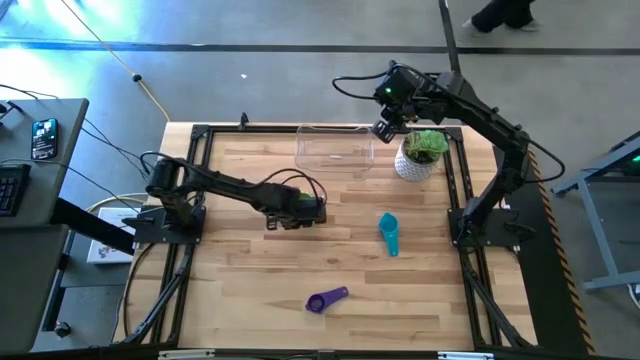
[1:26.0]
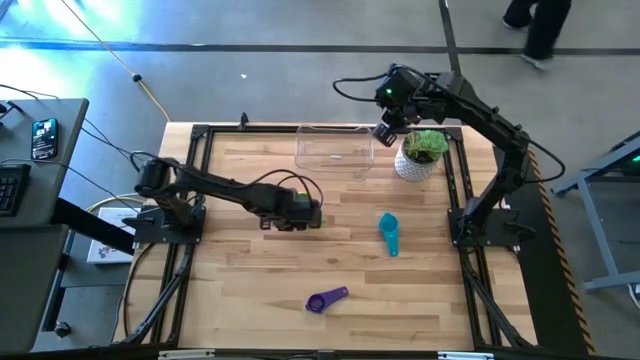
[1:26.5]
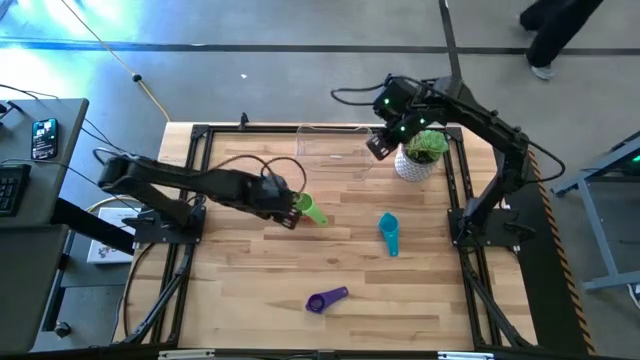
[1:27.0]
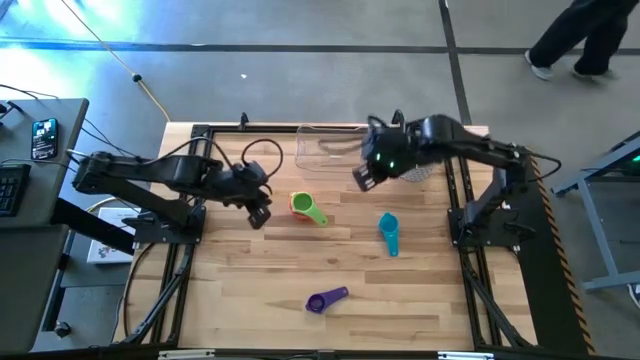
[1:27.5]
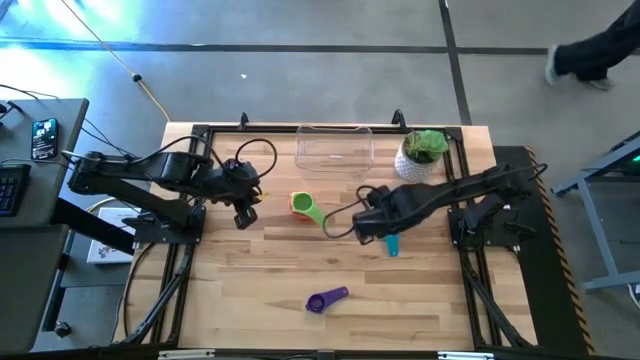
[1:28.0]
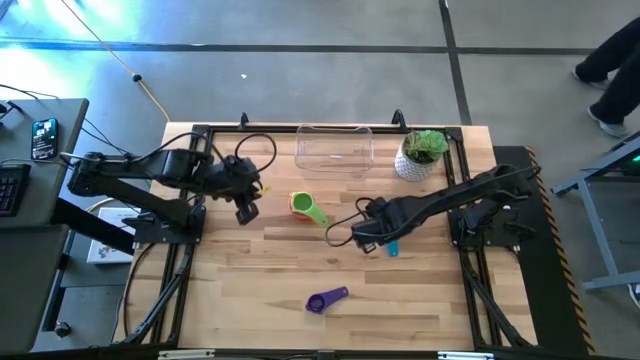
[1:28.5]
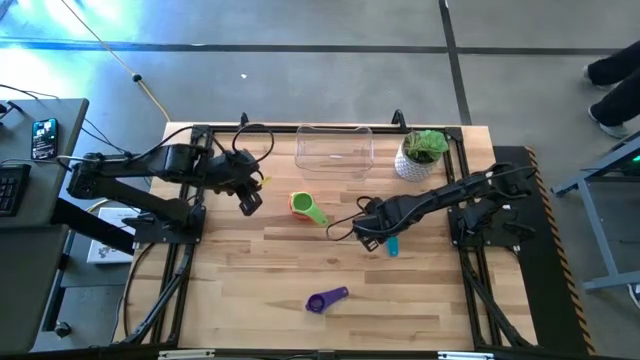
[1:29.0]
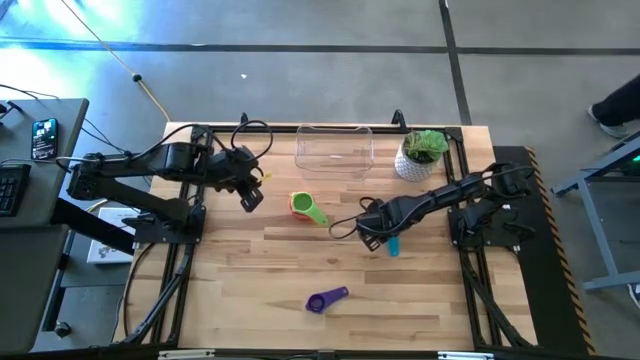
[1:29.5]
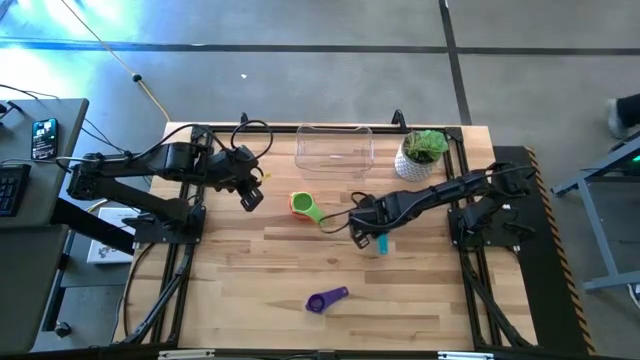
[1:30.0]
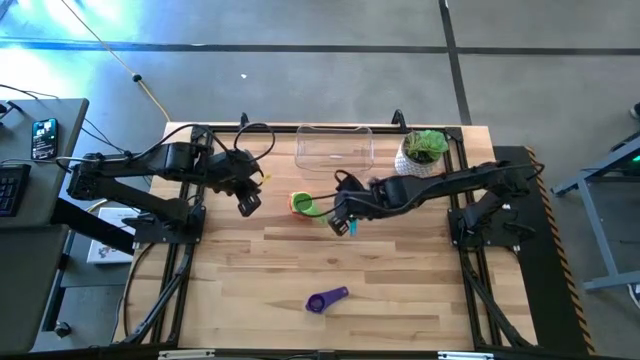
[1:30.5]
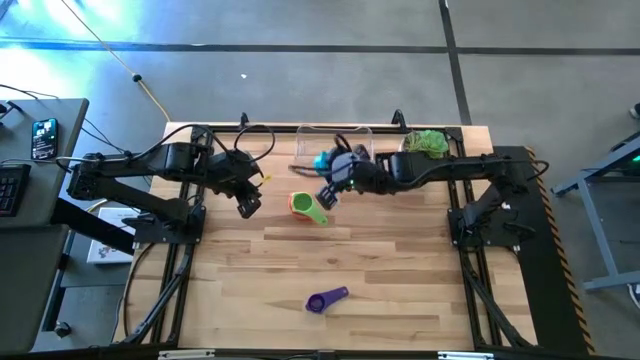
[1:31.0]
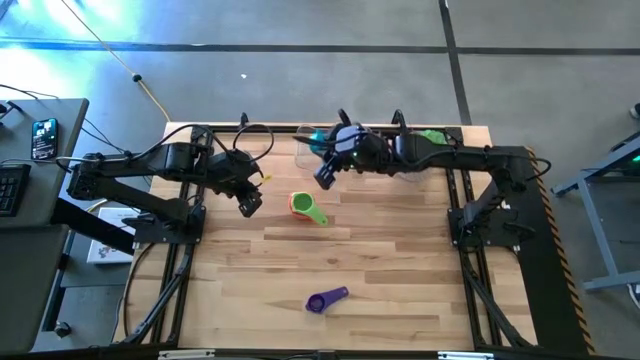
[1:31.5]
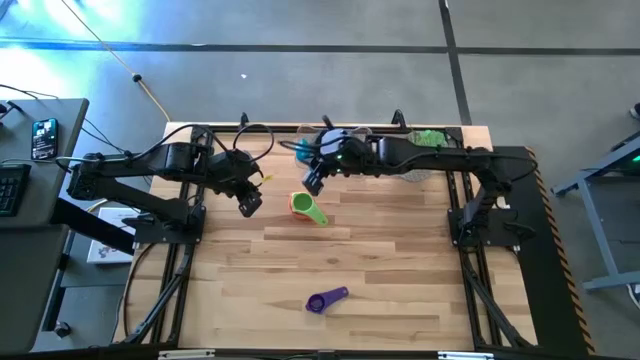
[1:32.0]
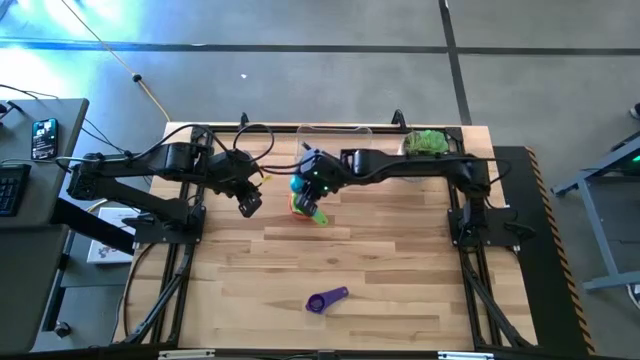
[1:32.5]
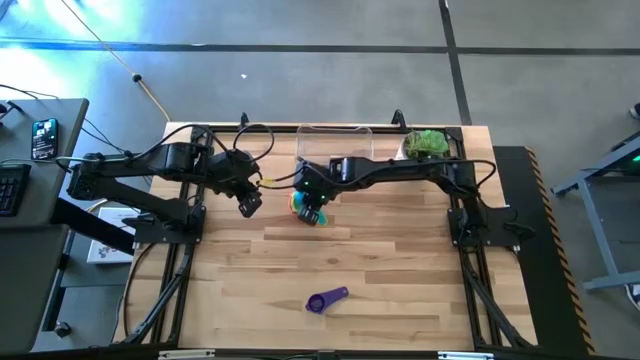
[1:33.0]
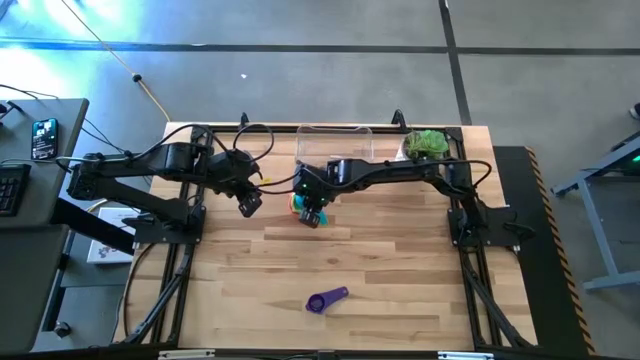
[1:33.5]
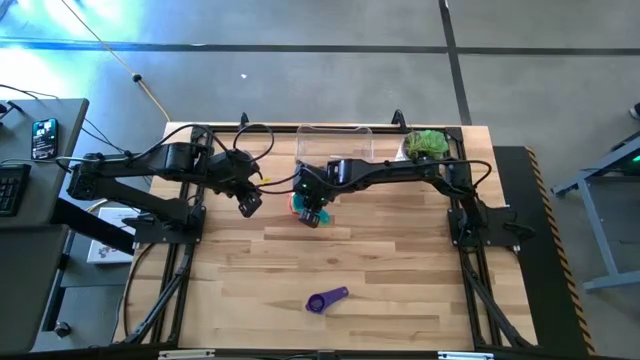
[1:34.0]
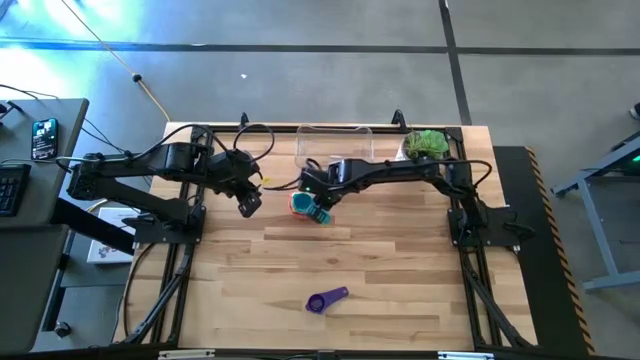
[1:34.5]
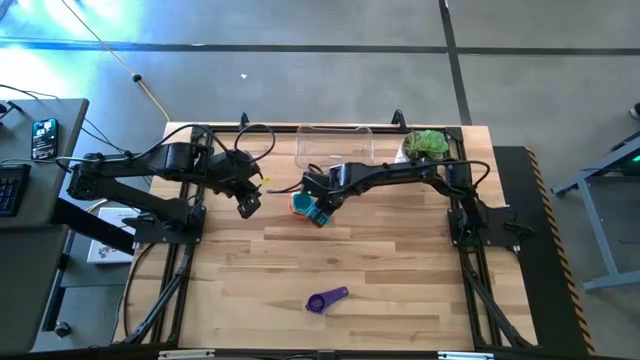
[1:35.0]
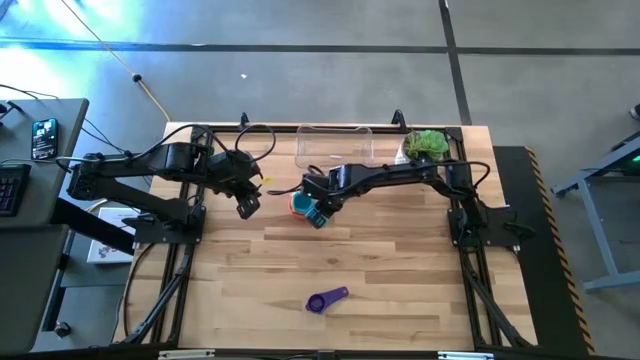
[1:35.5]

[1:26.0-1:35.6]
Task: Nest measuring cups in basket
Stack the blue measuring cup on the top of the green measuring cup

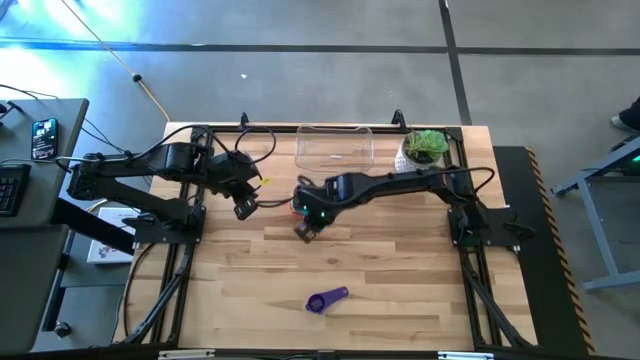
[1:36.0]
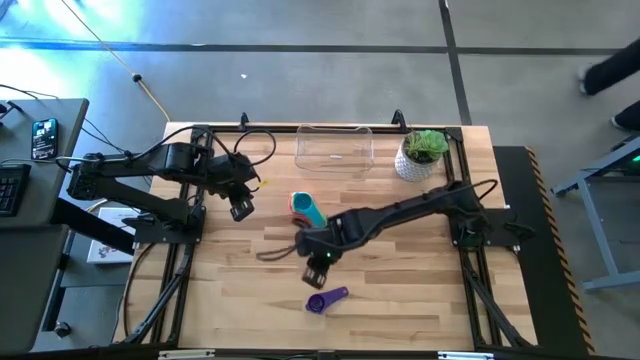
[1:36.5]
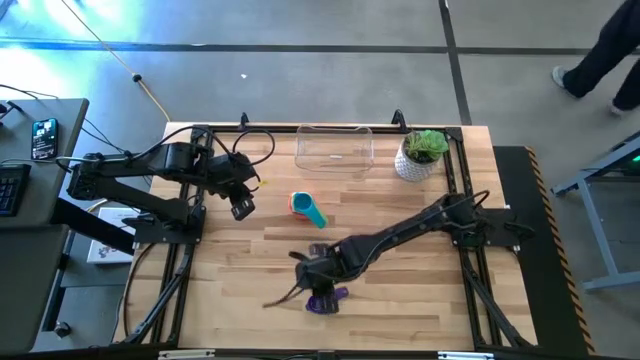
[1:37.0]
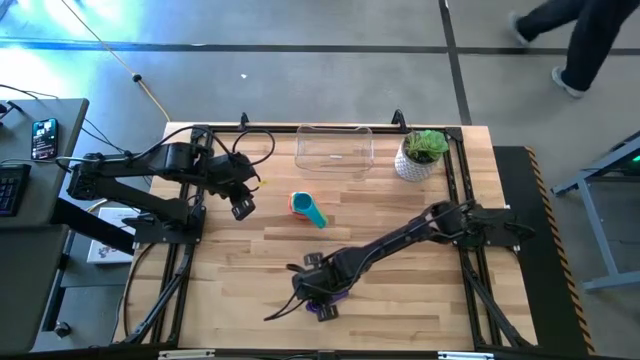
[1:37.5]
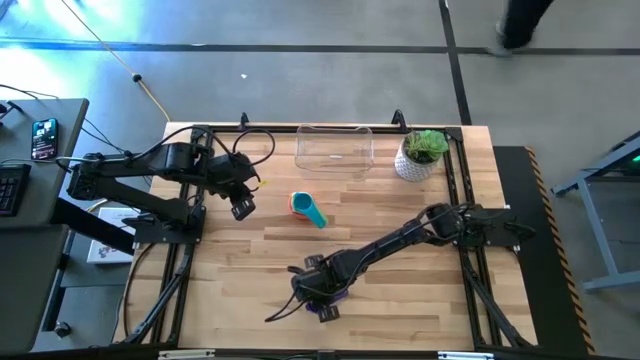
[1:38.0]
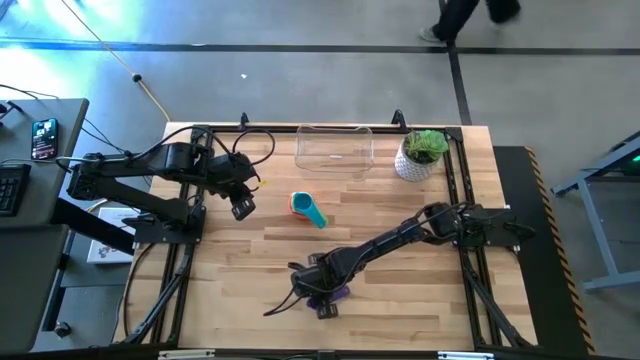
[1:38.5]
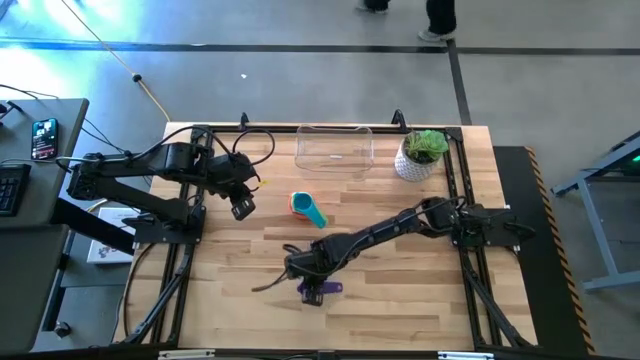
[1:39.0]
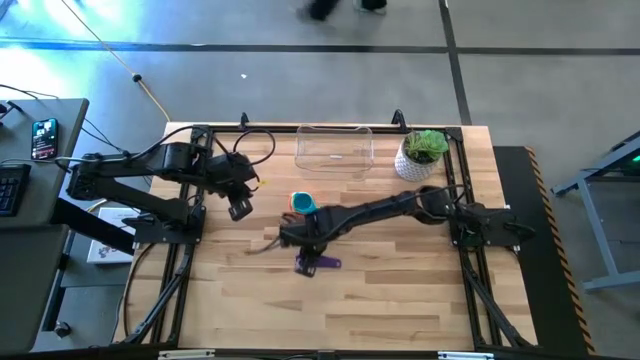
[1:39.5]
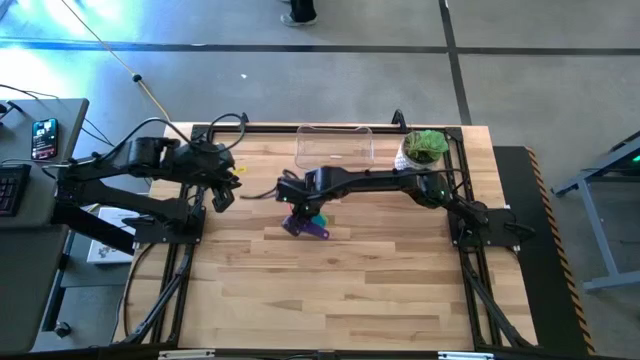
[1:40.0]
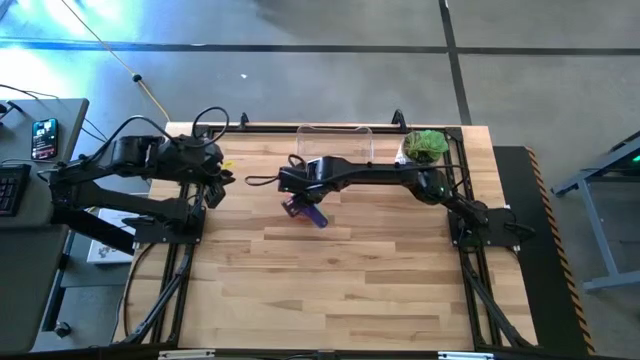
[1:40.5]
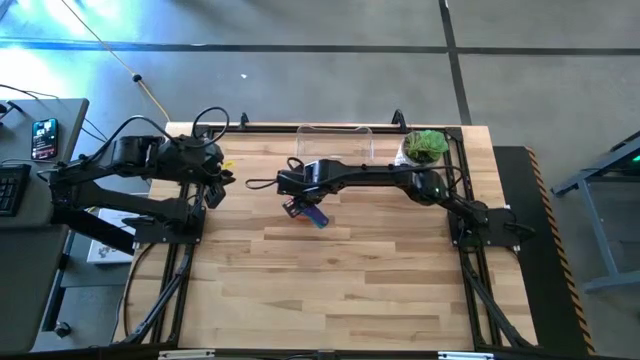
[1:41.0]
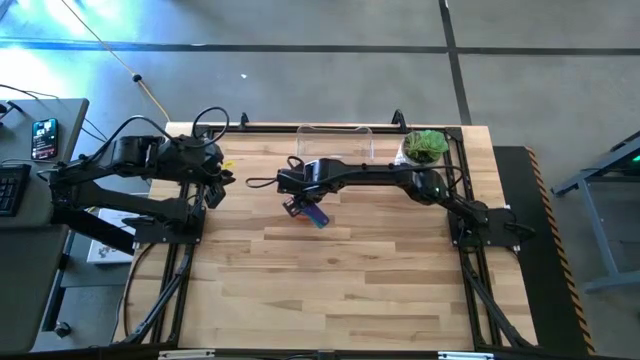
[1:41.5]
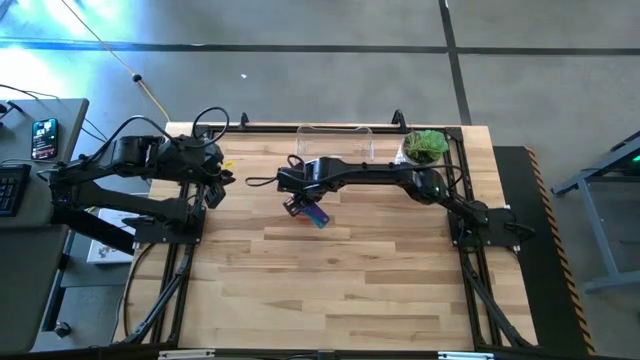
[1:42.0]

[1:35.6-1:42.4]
Stack the violet measuring cup on the top of the blue measuring cup

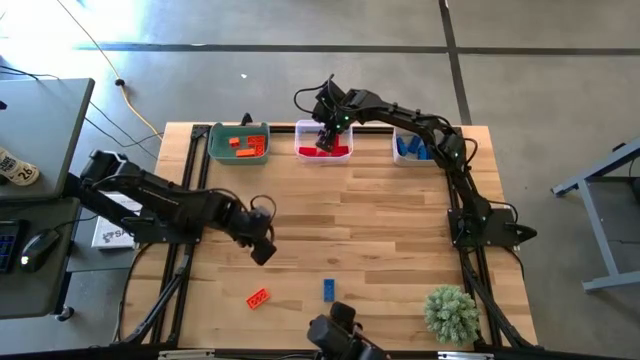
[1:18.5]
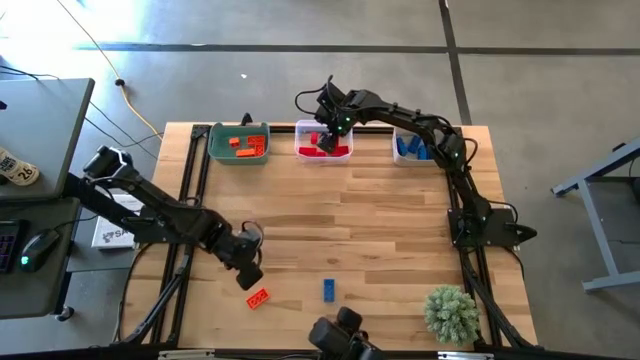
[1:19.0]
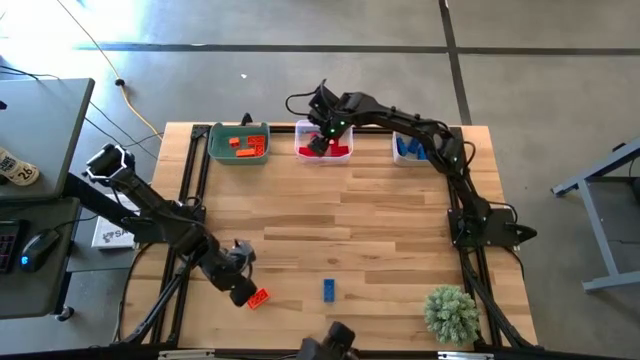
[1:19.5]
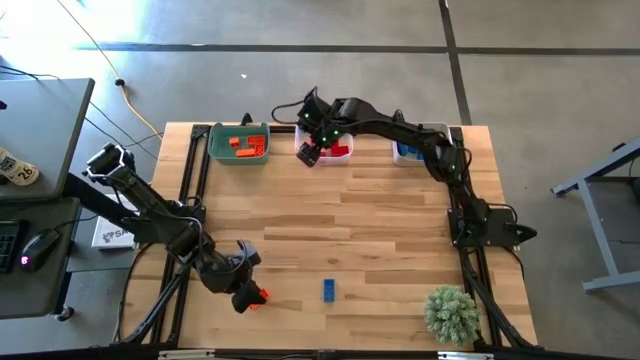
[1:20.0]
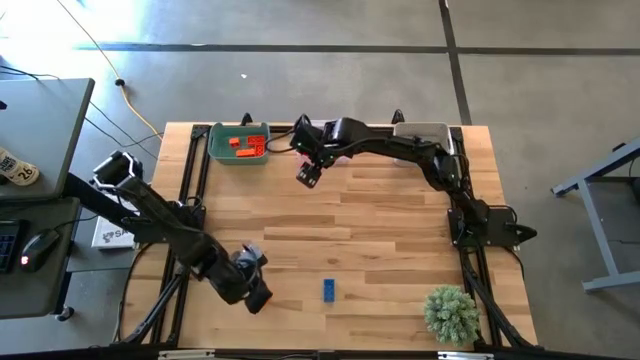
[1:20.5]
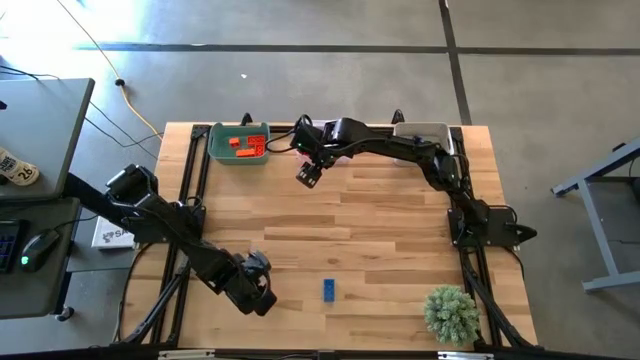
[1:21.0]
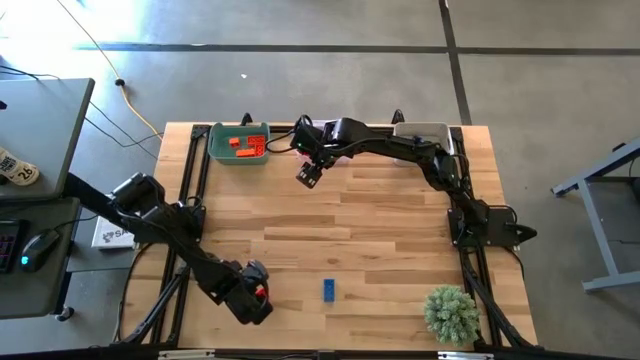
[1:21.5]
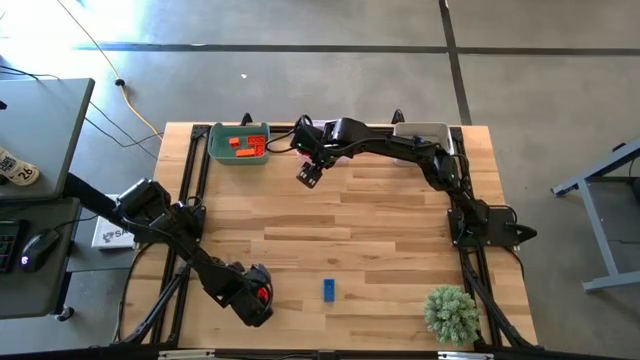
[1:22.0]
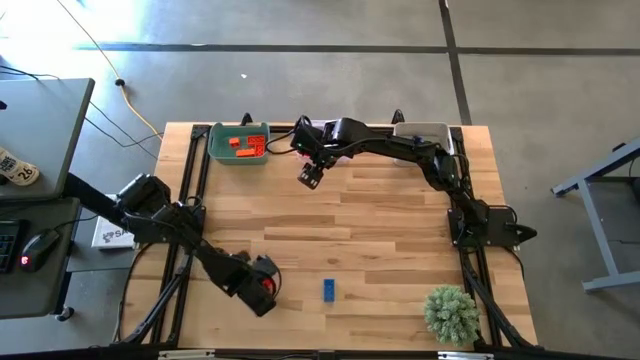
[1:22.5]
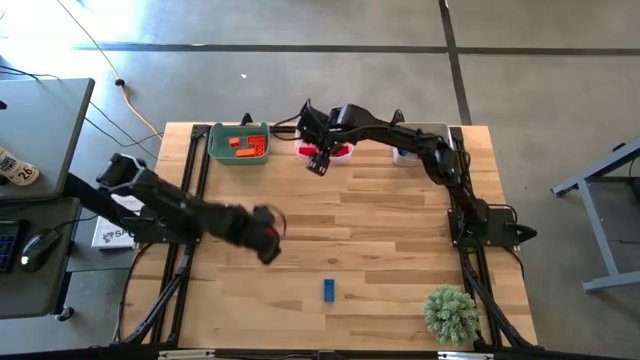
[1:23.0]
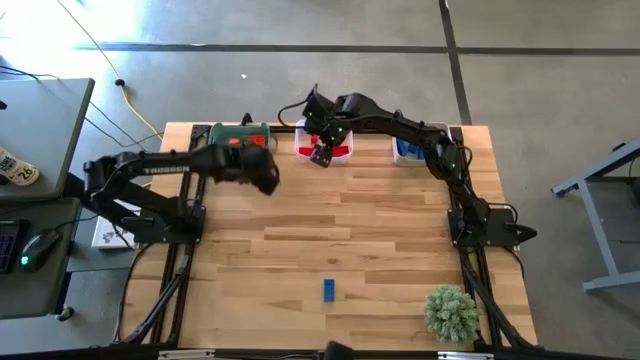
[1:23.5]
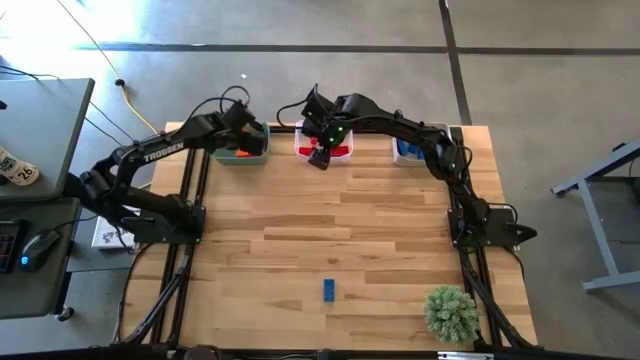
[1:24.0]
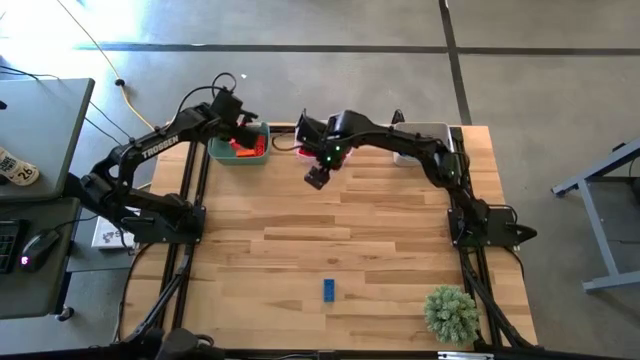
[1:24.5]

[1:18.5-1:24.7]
Task: Sort & place blocks by color
Put the orange game piece into the green bin
